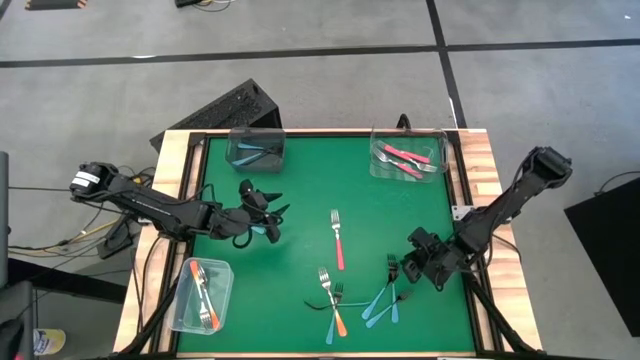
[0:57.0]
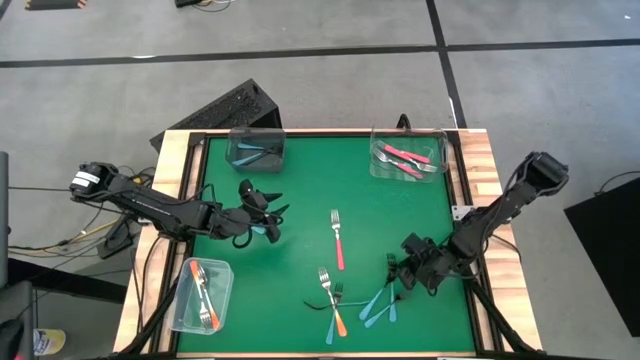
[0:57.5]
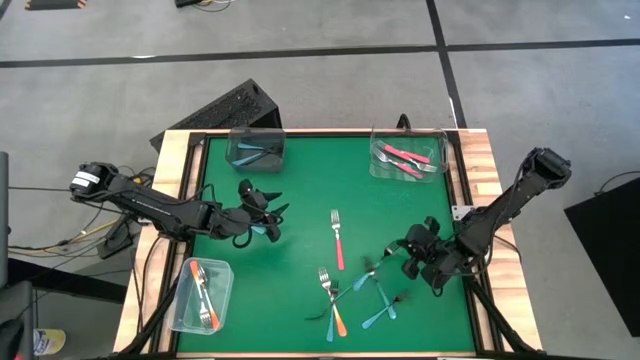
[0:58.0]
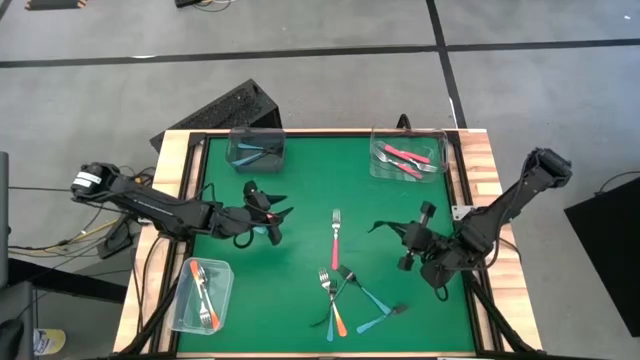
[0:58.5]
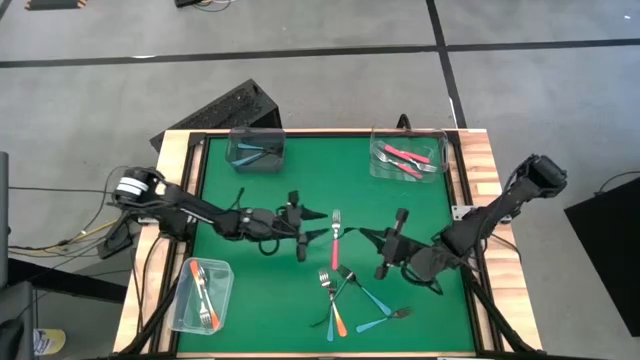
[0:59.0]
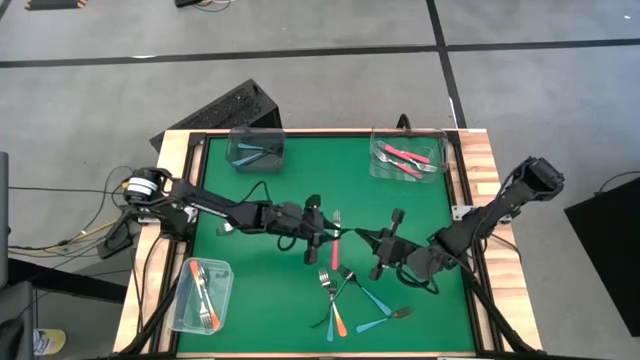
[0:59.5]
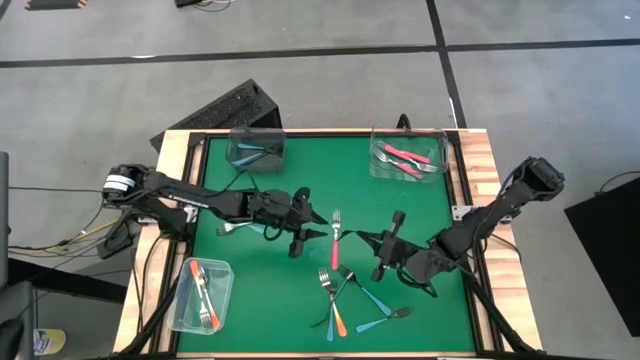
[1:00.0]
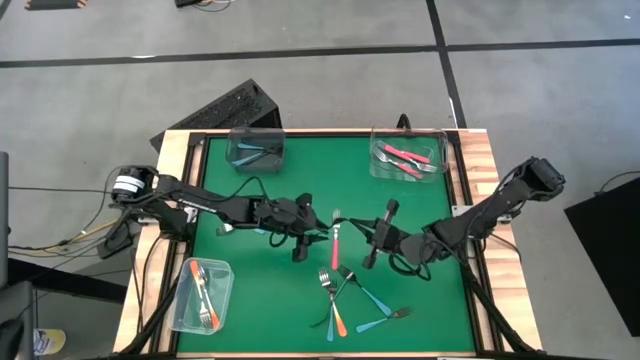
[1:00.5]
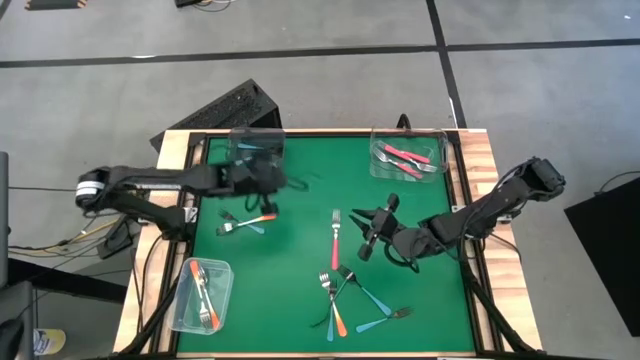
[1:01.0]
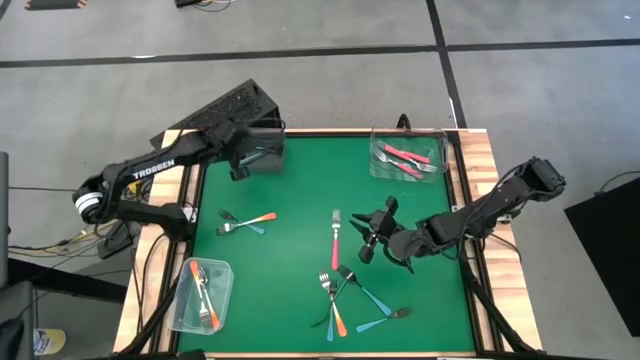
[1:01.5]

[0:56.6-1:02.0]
Task: Sort silverware by color (type)
Put the blue fork into the black bin

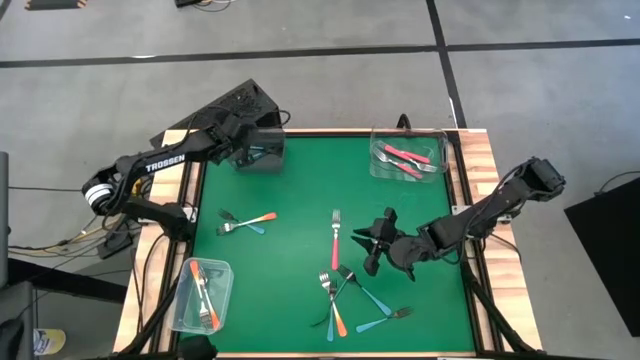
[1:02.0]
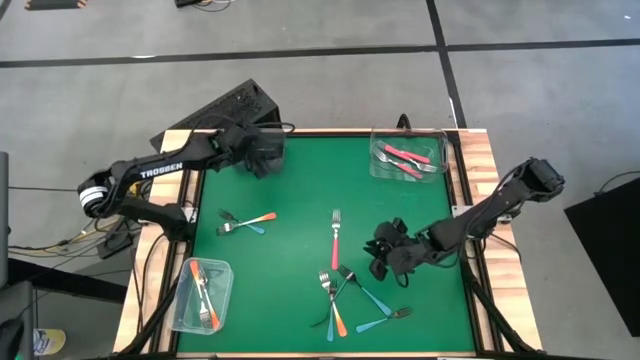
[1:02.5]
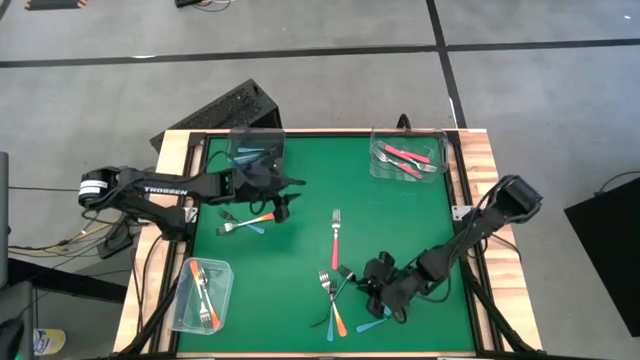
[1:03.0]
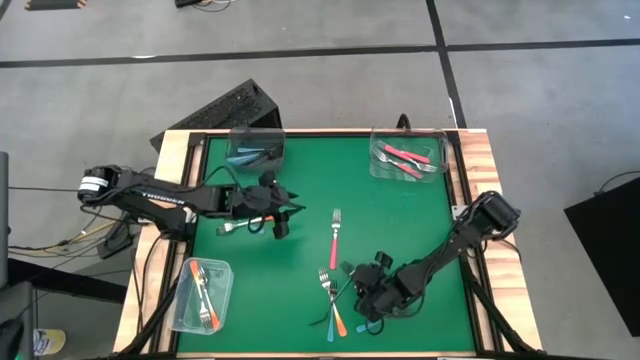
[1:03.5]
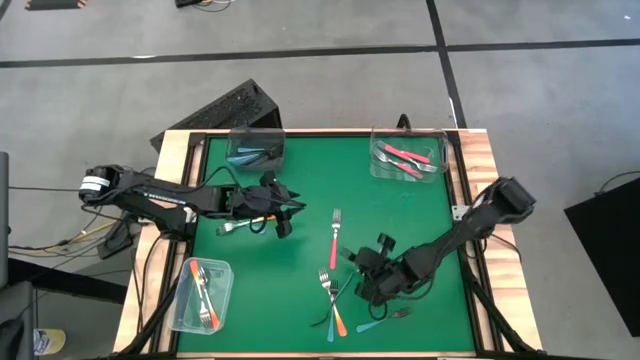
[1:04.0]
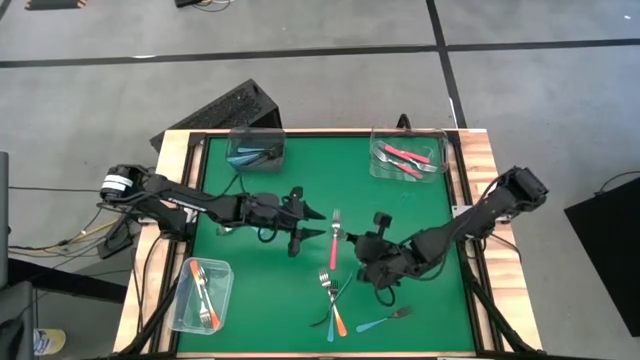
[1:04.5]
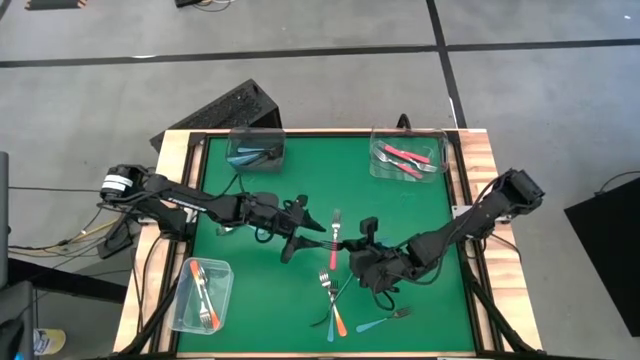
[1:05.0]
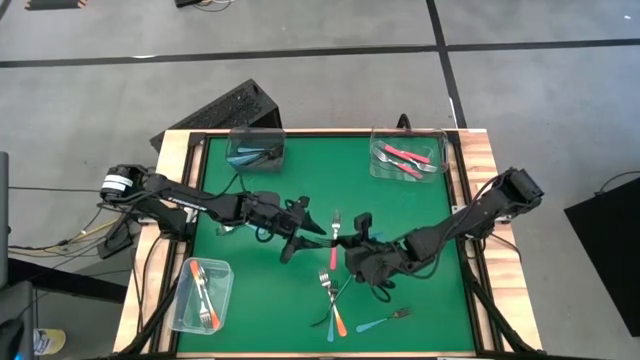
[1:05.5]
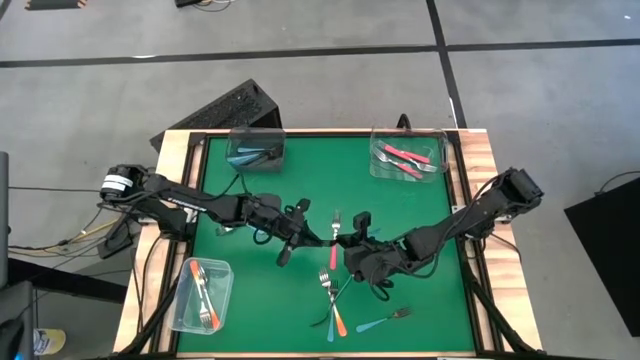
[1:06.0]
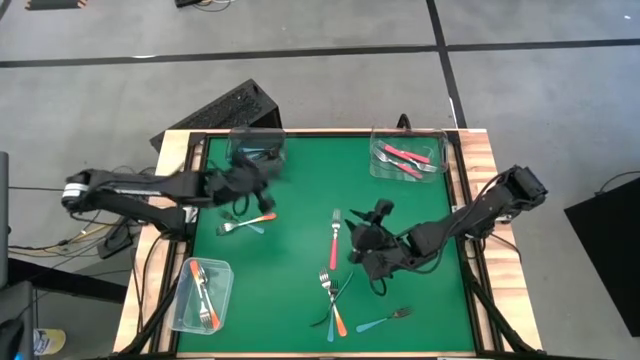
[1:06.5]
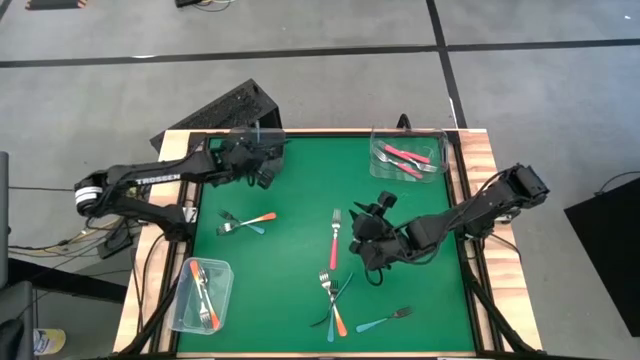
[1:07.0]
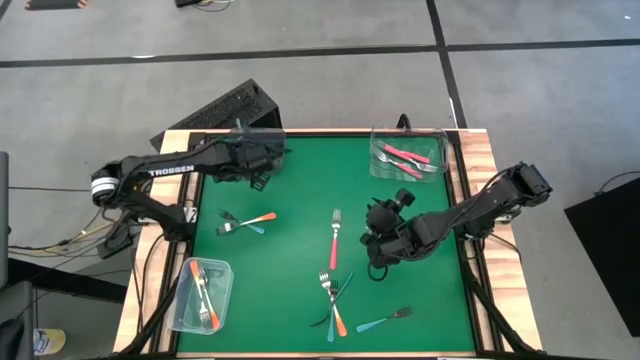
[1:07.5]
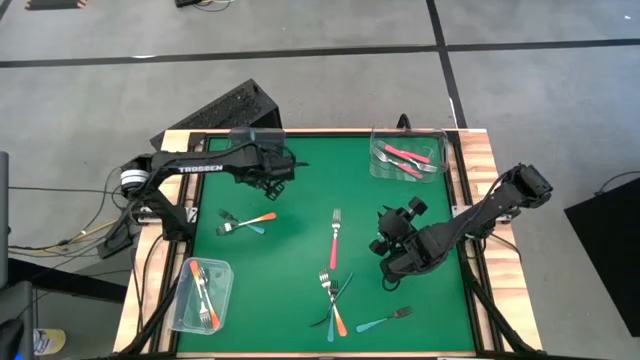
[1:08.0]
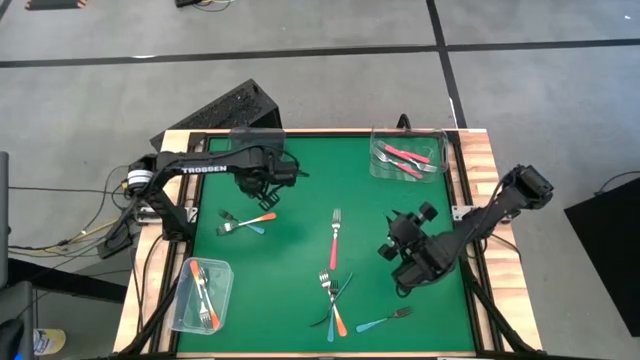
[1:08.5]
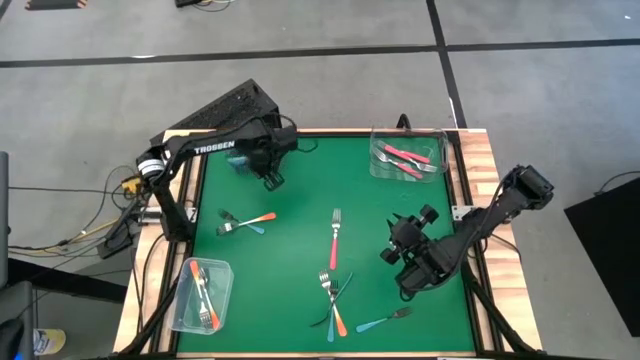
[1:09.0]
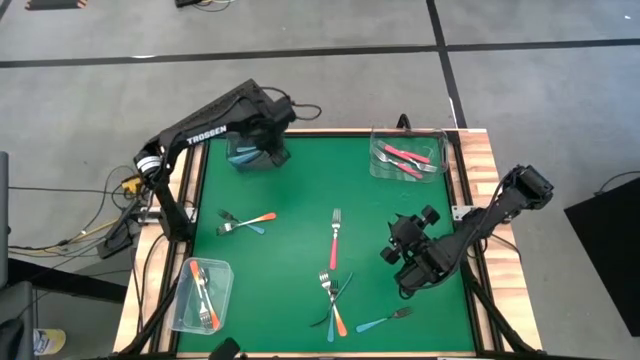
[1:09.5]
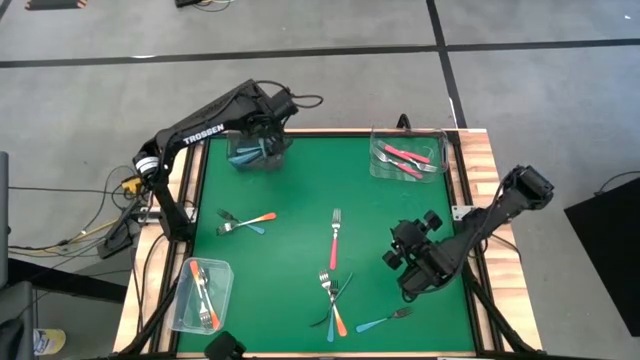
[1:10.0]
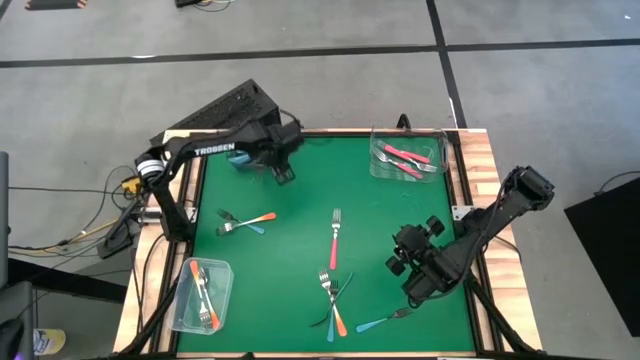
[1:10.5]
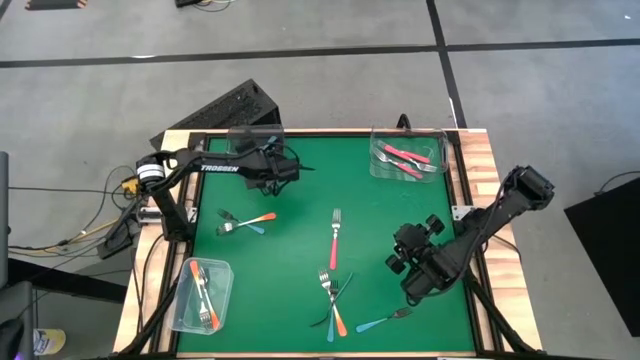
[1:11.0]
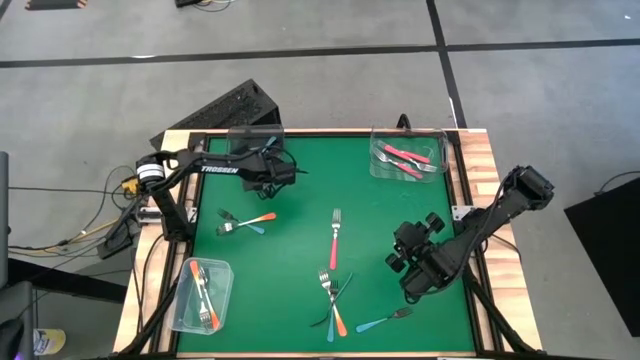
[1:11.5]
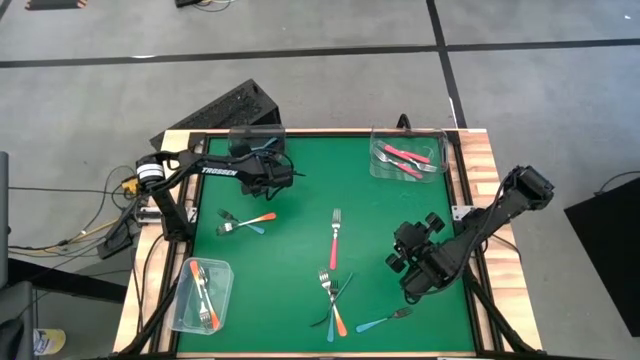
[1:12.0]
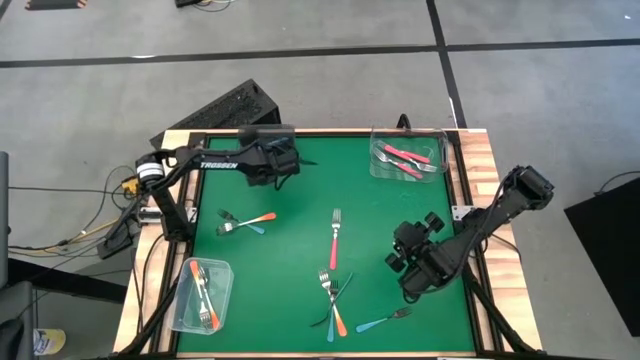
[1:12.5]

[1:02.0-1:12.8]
Put the blue fork into the black bin

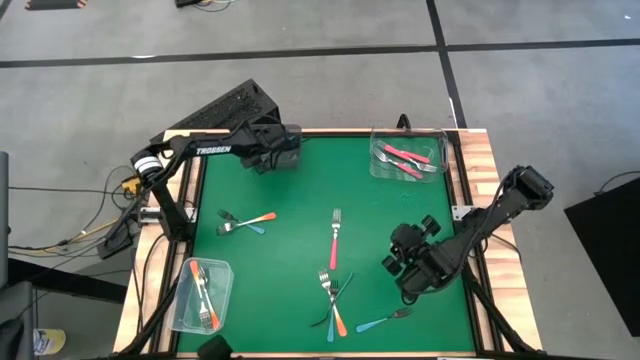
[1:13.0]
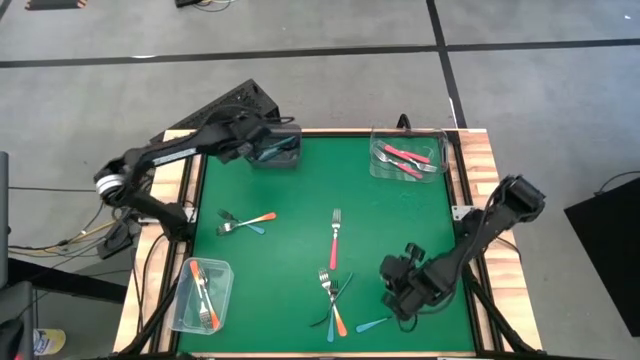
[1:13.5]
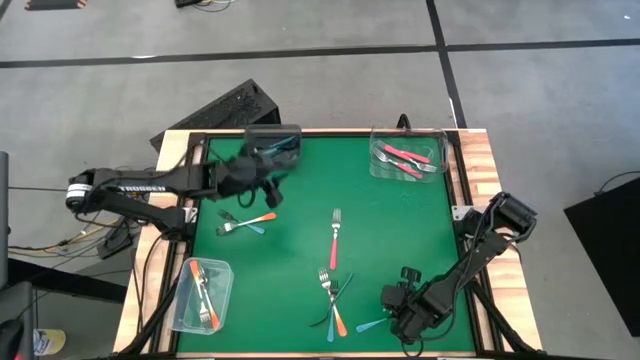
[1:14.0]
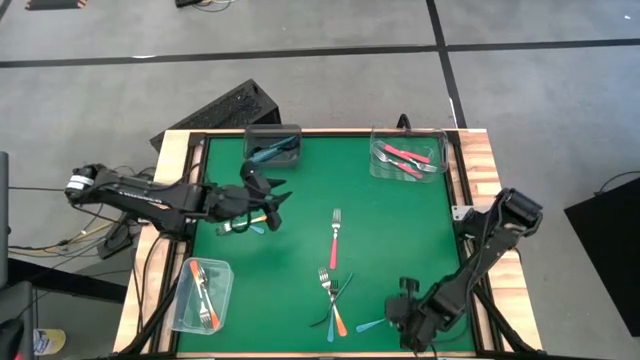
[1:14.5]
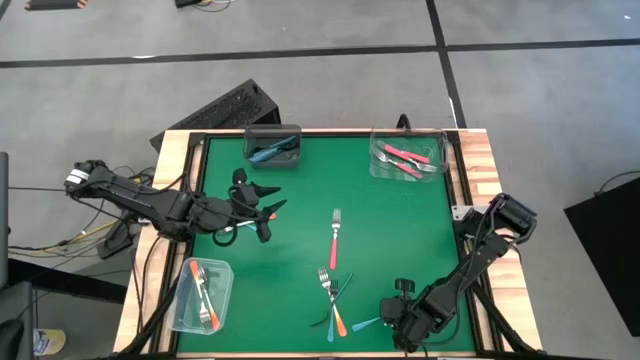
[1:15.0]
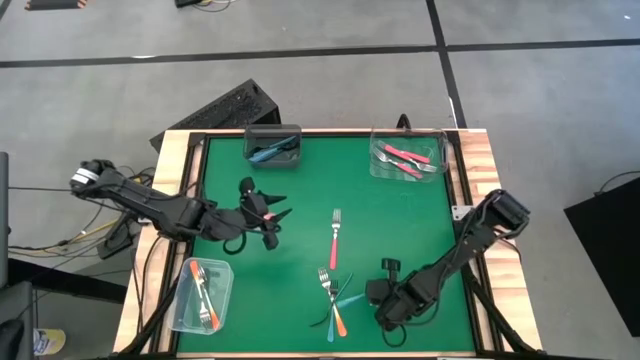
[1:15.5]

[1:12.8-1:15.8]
Put the blue fork into the black bin

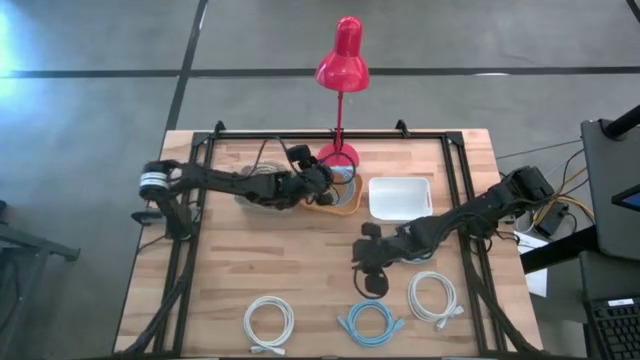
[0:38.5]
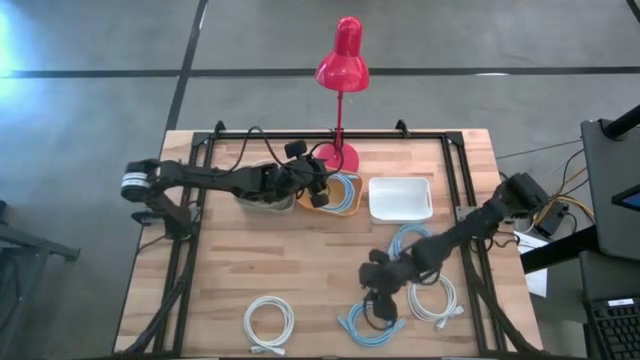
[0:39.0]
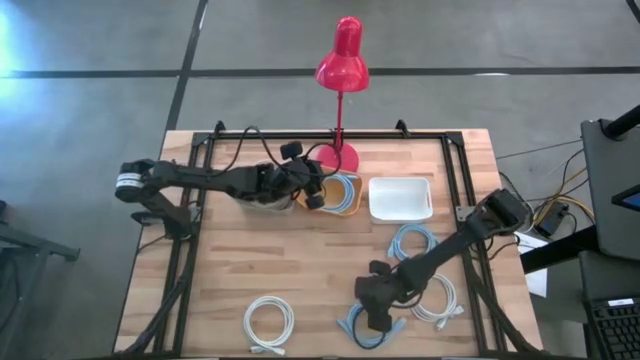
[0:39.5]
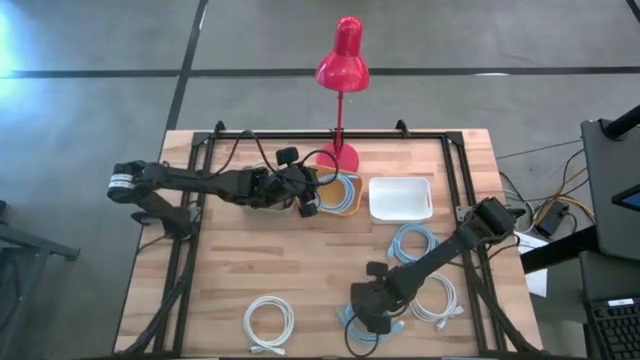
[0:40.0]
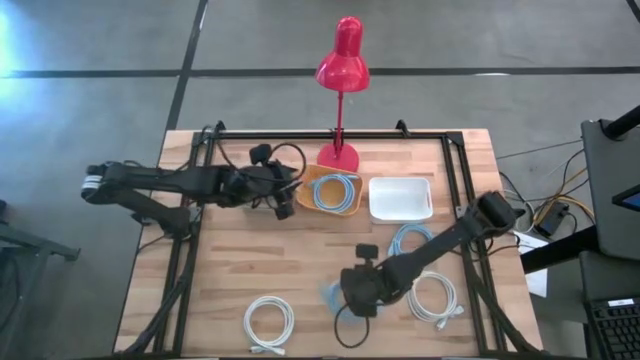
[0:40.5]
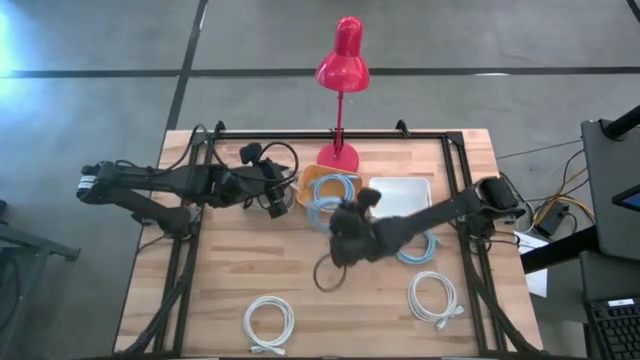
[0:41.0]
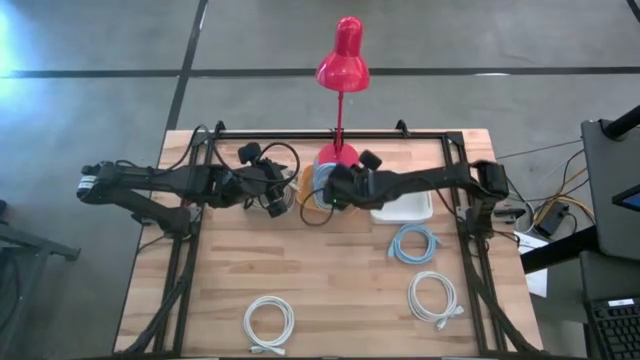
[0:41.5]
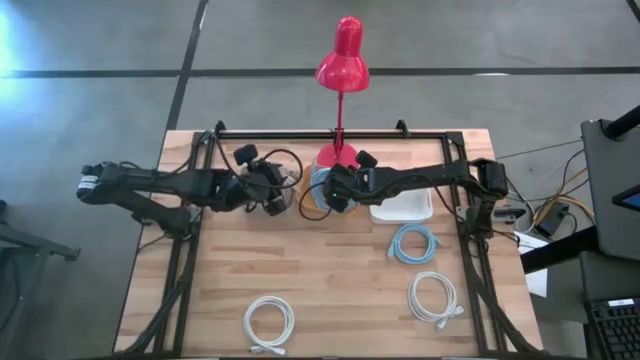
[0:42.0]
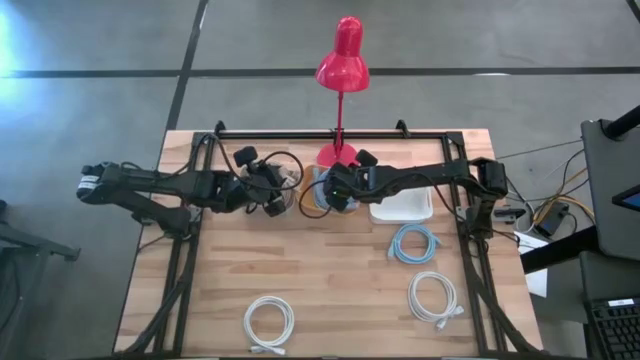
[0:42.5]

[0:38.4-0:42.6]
Task: Sort HDMI cables
Put the bottom blue hdmi cable into the orange bin
